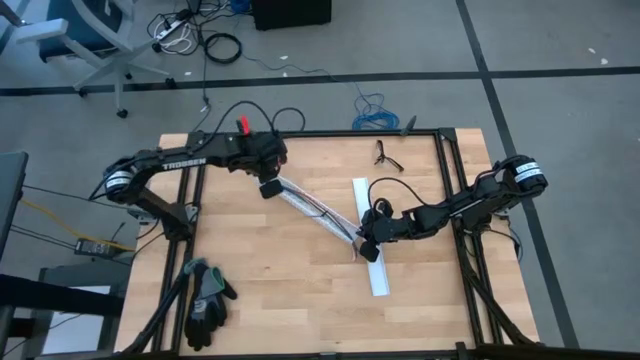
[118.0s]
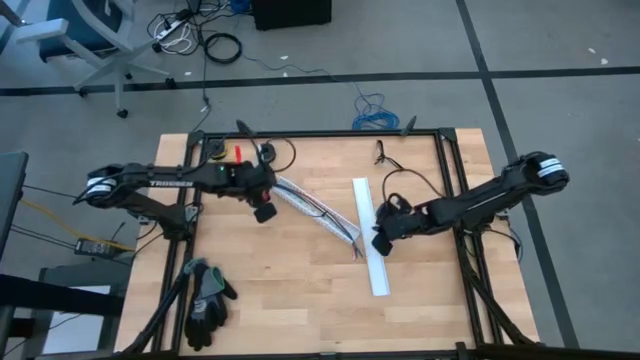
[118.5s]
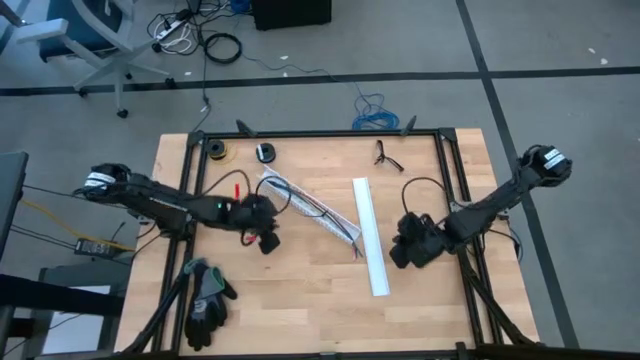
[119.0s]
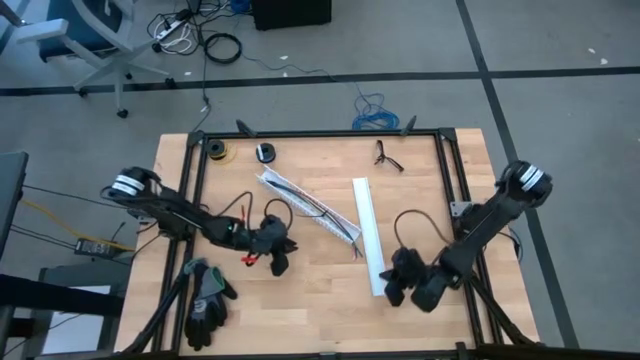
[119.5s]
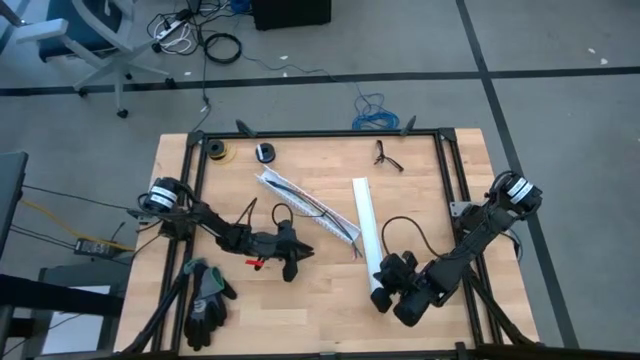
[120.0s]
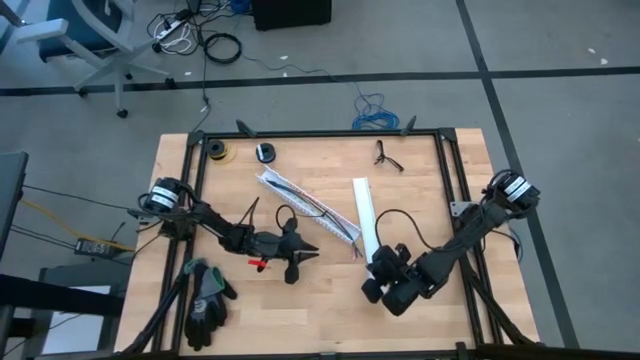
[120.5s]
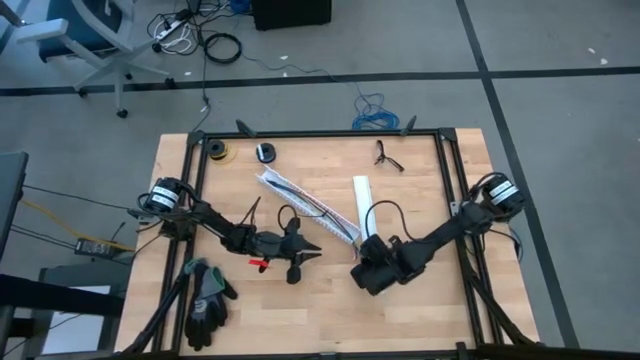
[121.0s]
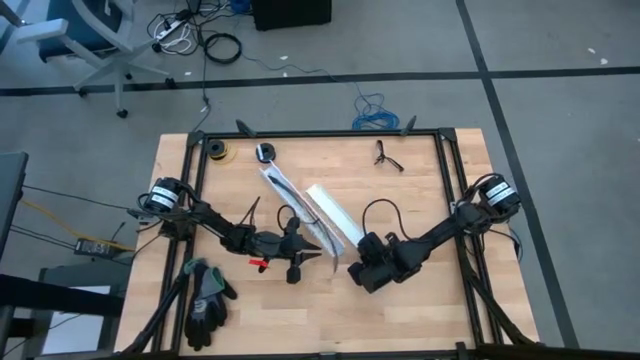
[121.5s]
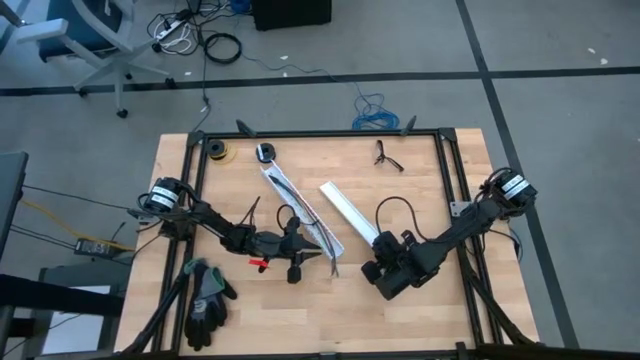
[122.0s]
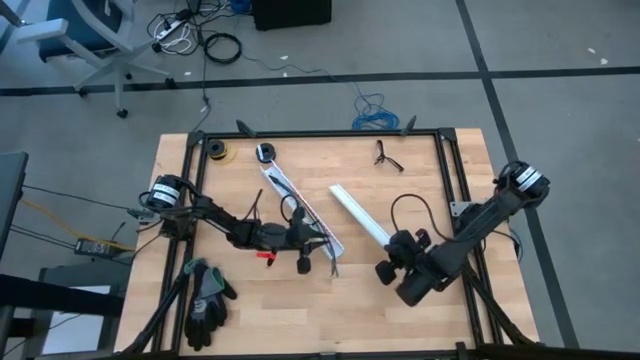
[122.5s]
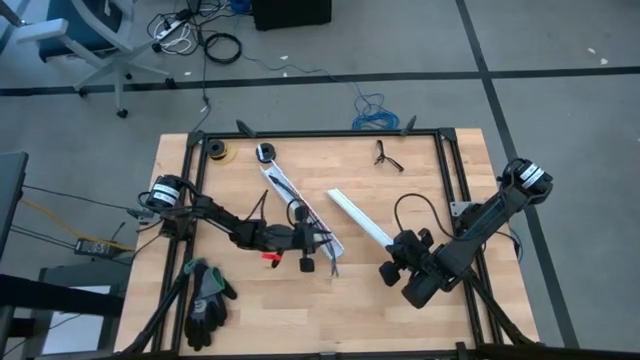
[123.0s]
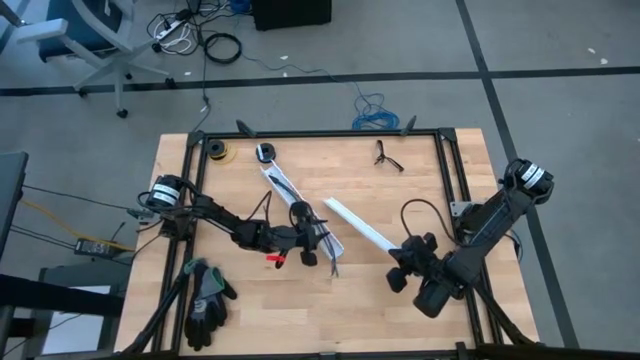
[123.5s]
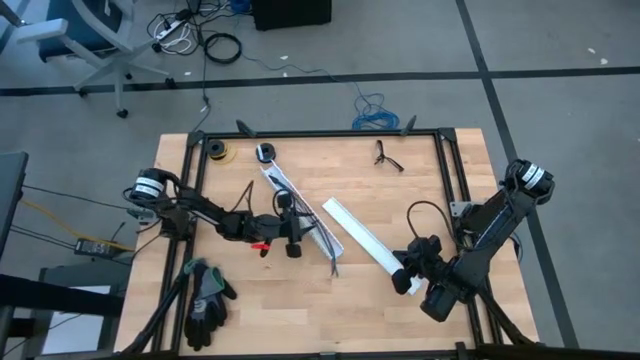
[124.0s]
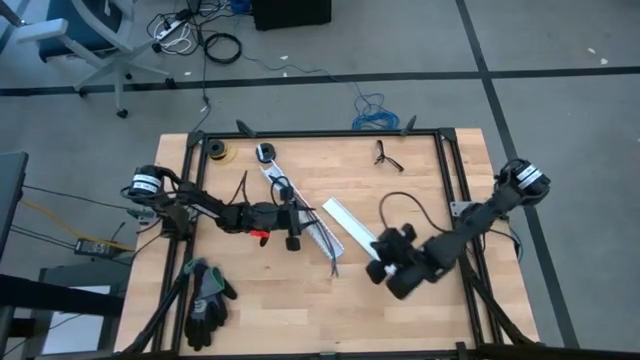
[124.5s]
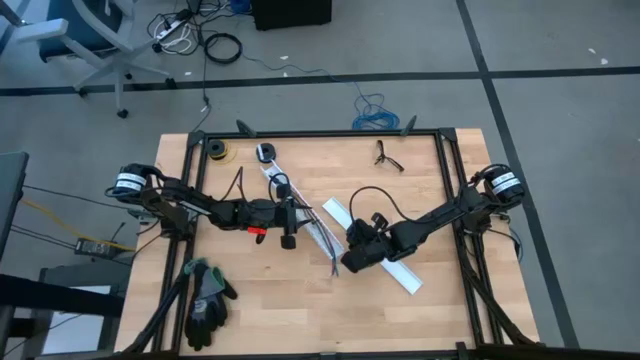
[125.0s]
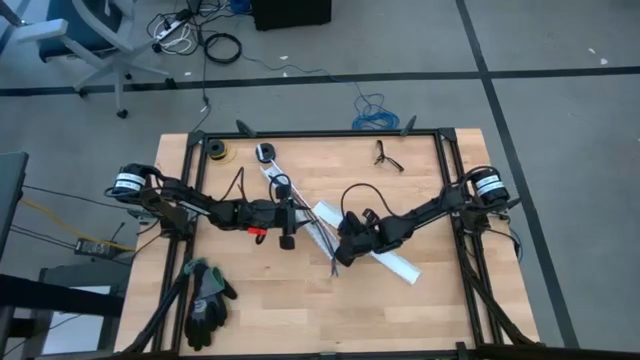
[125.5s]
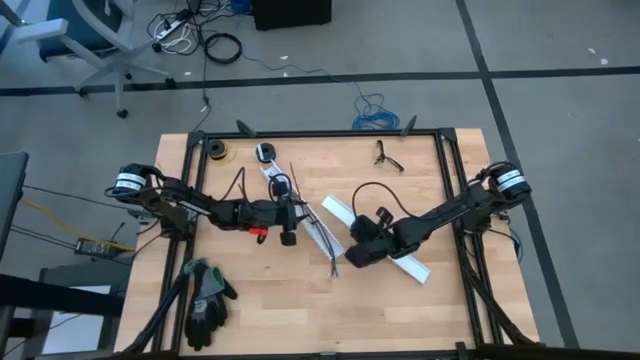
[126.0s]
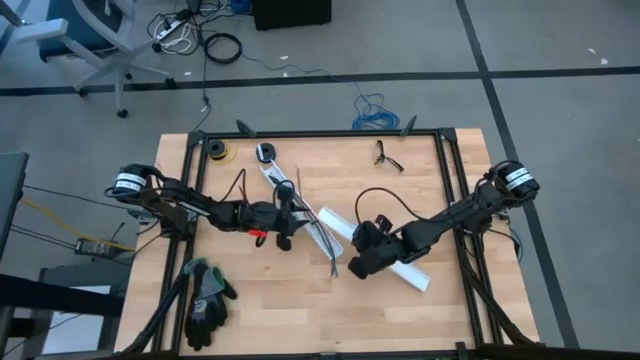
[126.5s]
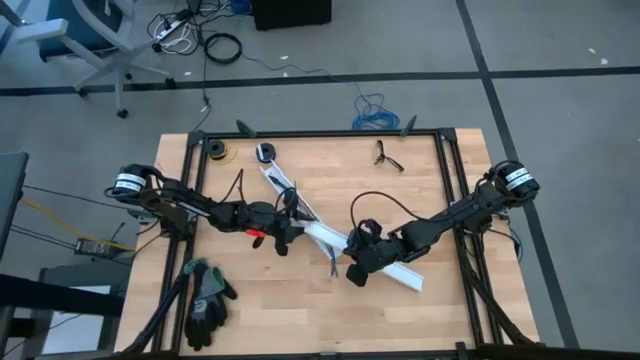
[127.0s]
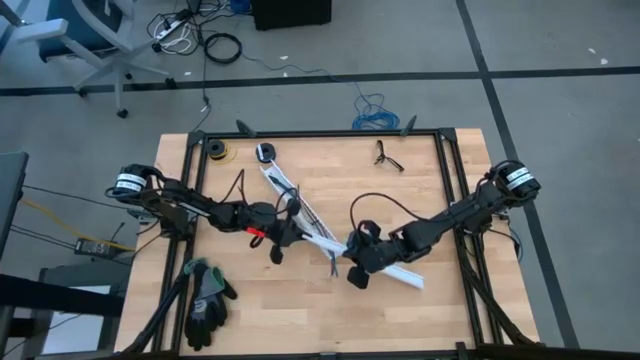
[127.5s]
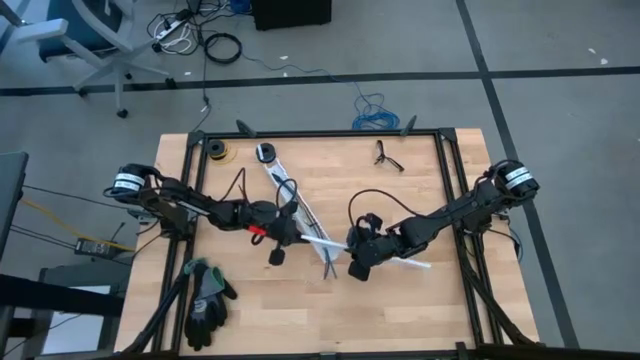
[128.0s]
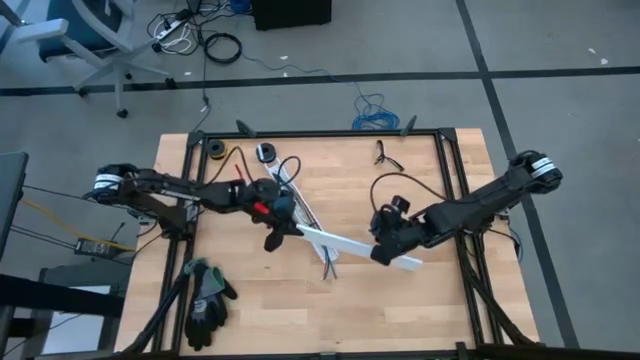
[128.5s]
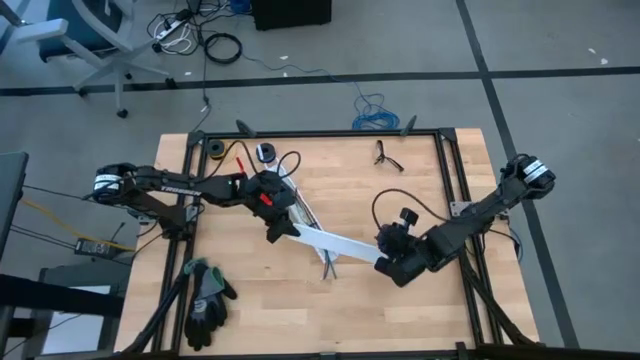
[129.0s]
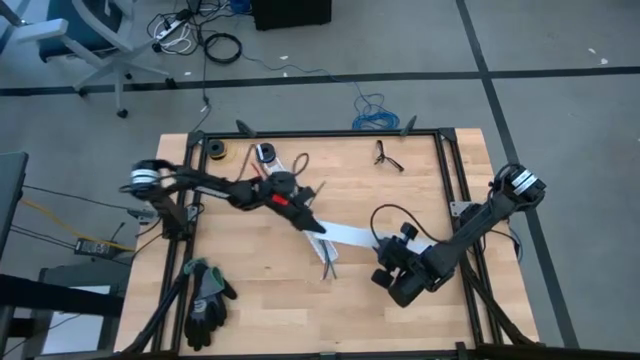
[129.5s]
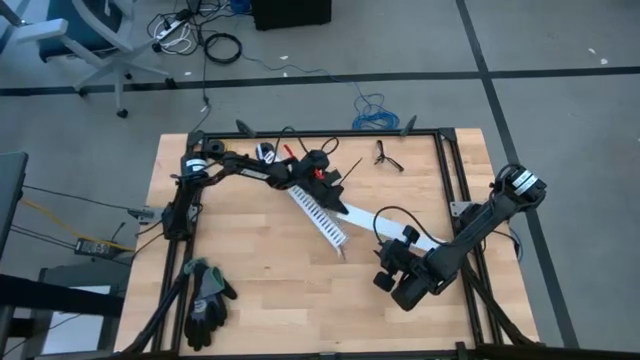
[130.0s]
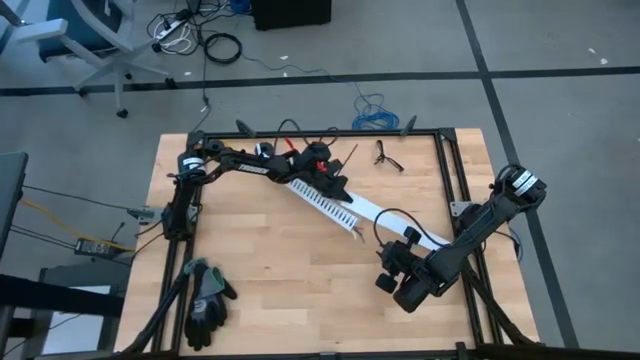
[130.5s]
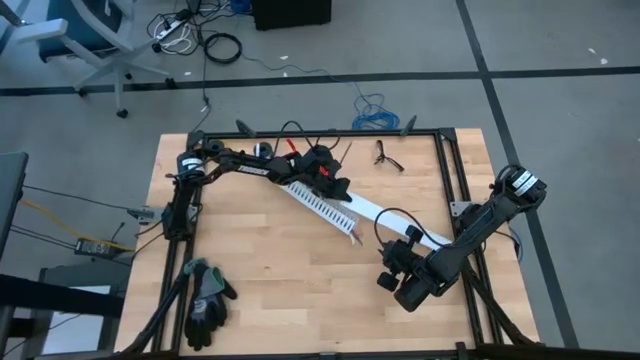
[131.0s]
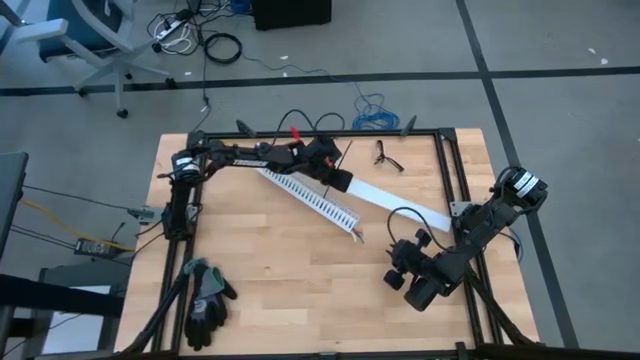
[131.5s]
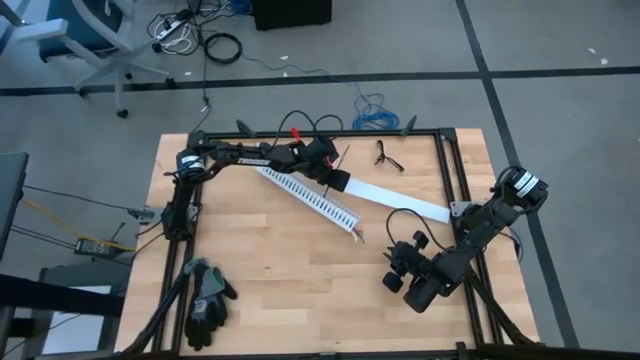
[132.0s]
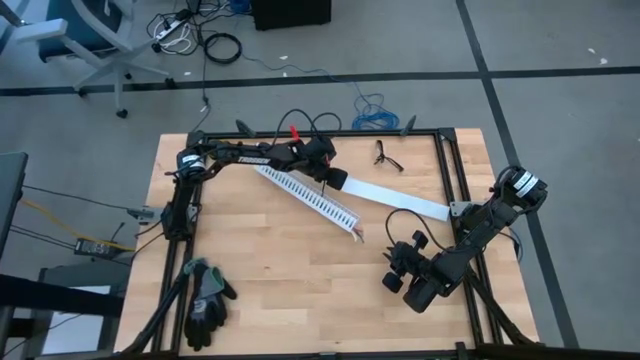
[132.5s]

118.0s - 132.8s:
Task: Ziptie cables
Close the cable duct

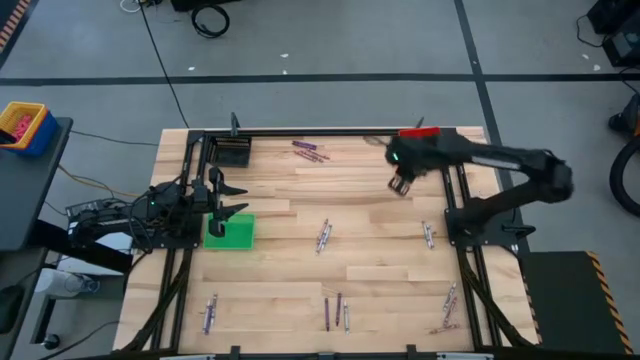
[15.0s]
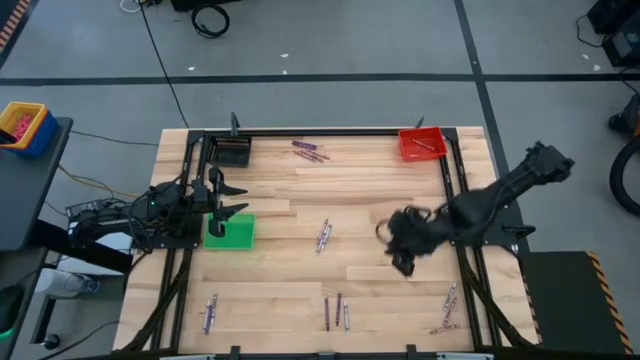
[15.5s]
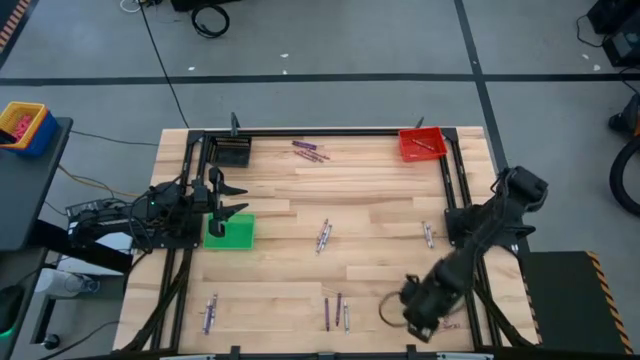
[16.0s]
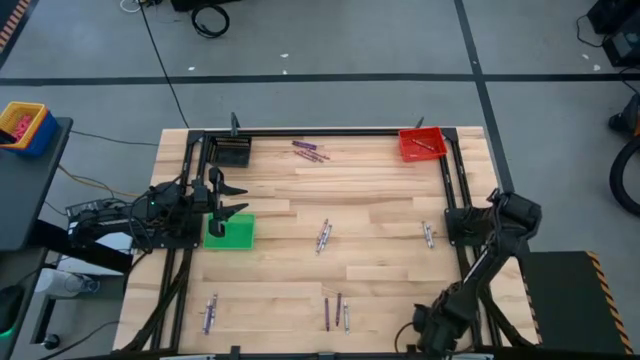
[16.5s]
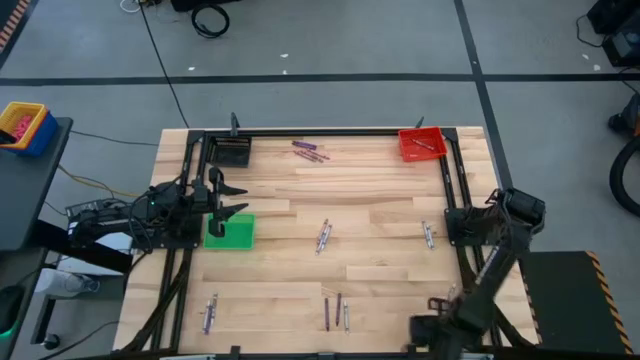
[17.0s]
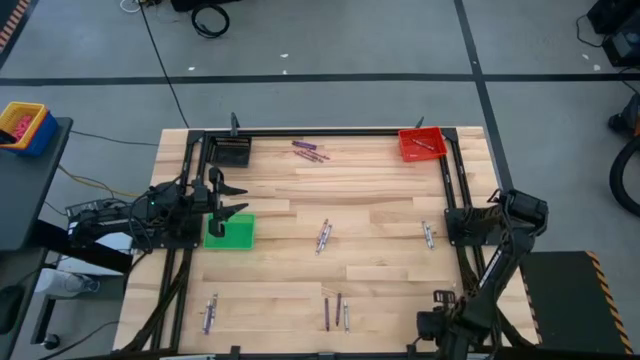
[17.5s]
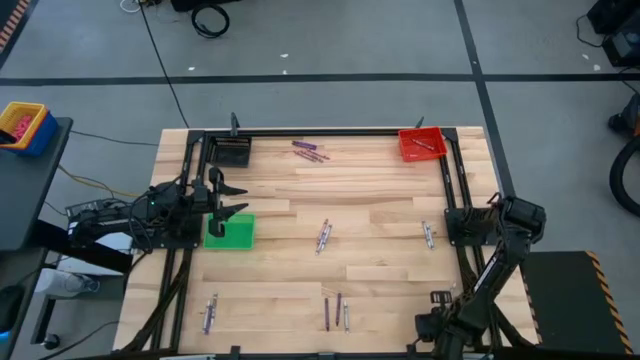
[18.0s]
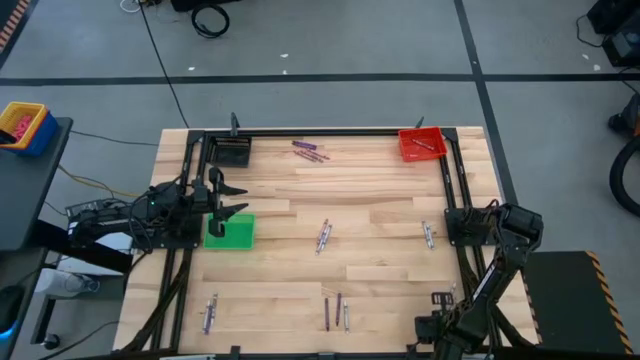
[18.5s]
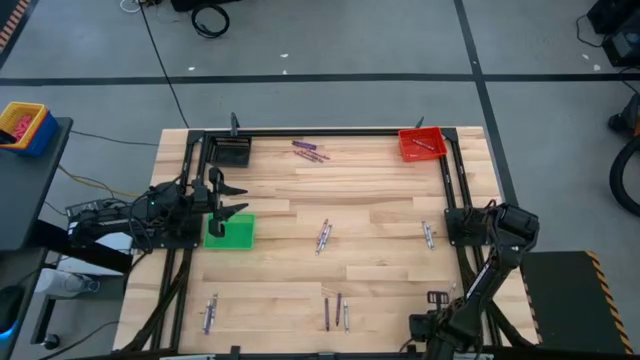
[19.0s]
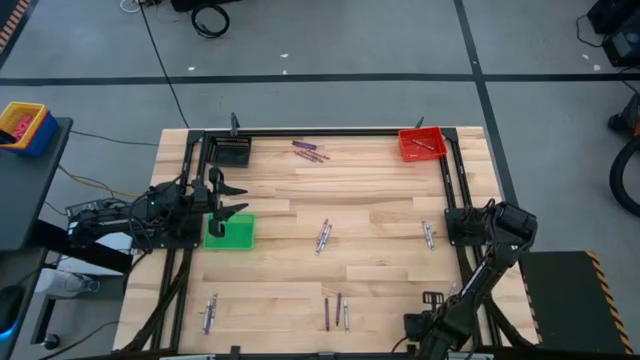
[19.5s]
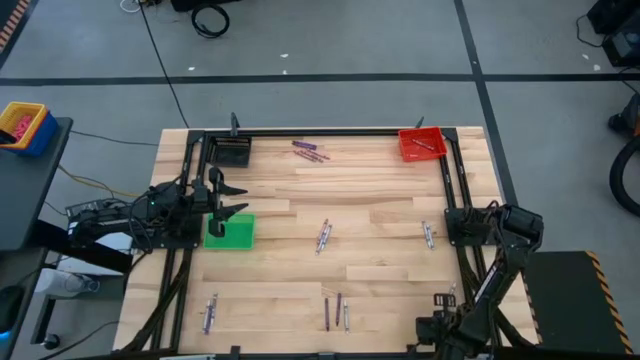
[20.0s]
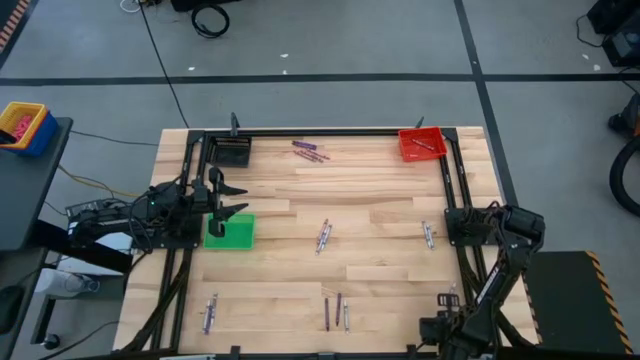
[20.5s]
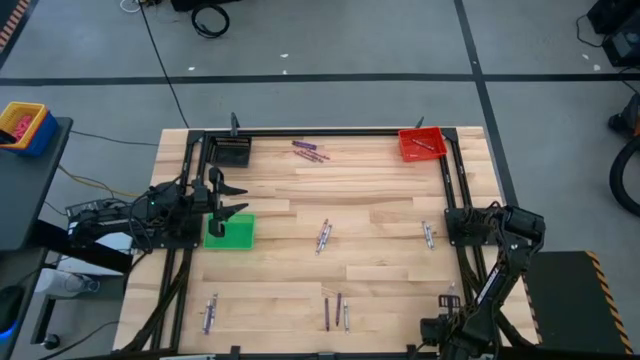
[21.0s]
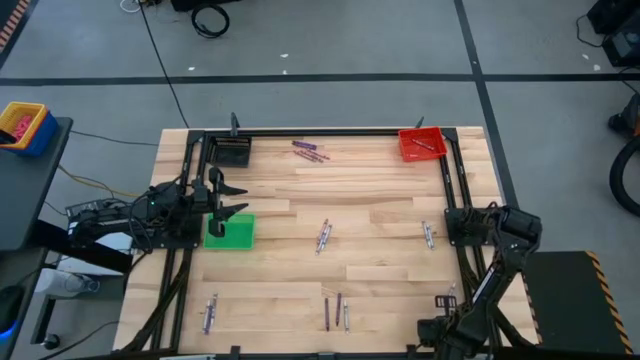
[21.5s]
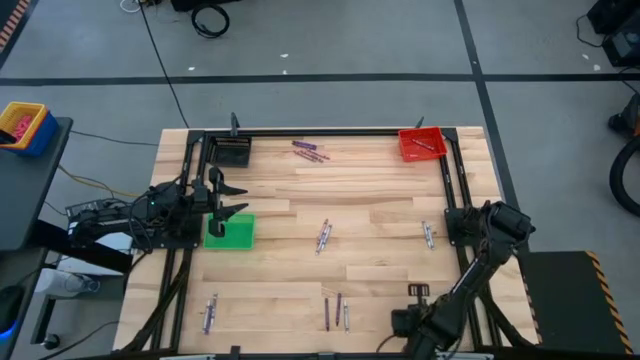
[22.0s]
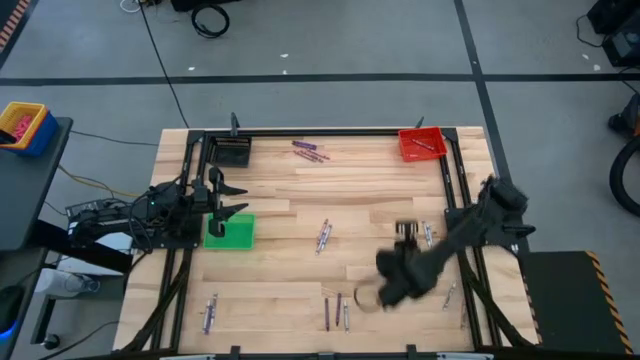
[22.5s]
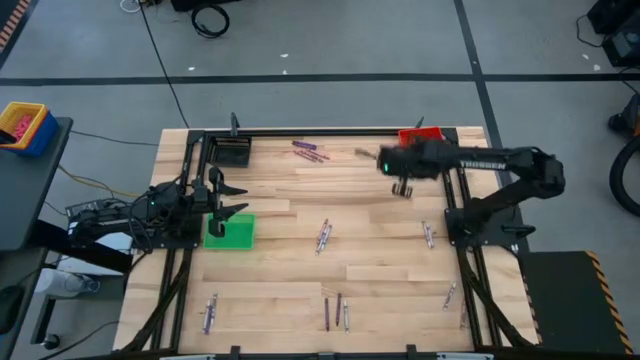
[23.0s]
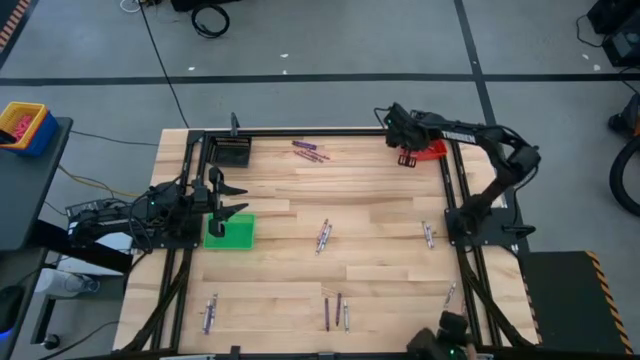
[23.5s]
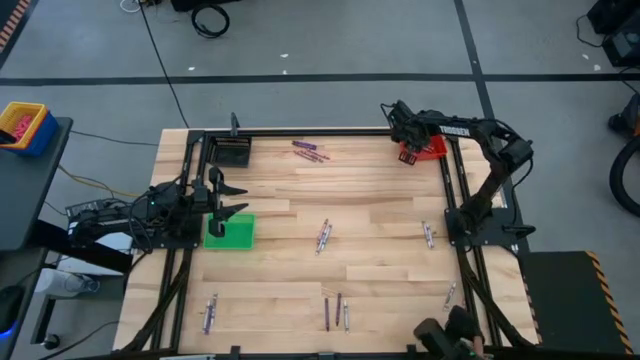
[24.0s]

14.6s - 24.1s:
Task: Sort crayons
Put the pink crayon into the red bin
